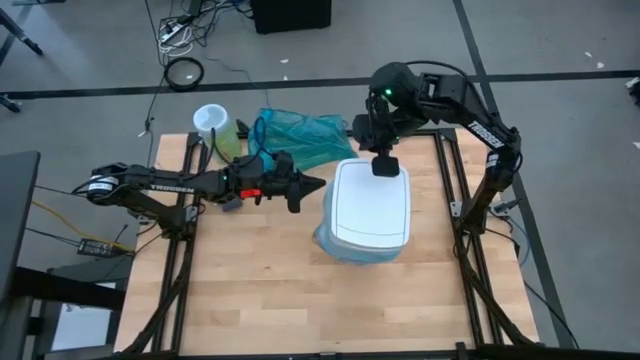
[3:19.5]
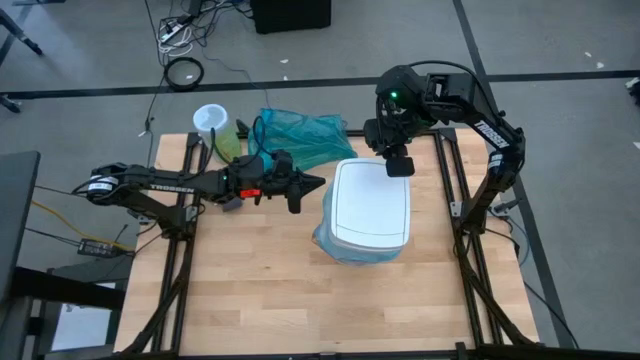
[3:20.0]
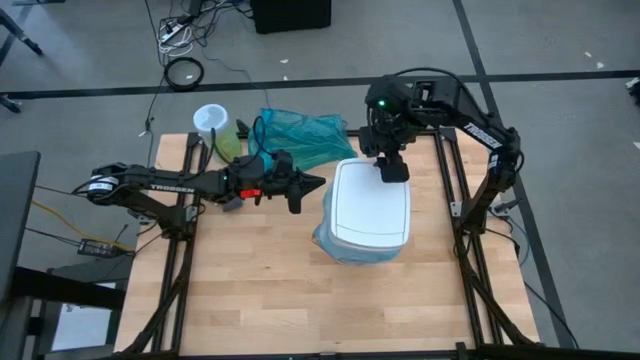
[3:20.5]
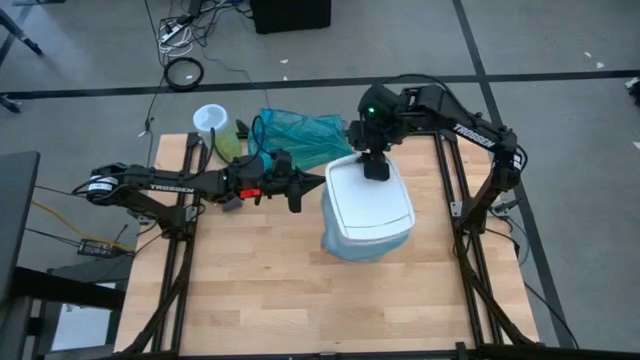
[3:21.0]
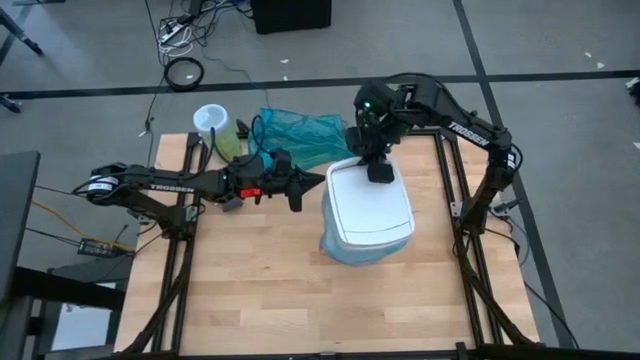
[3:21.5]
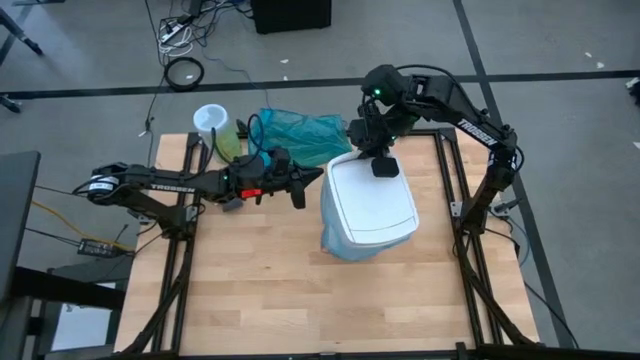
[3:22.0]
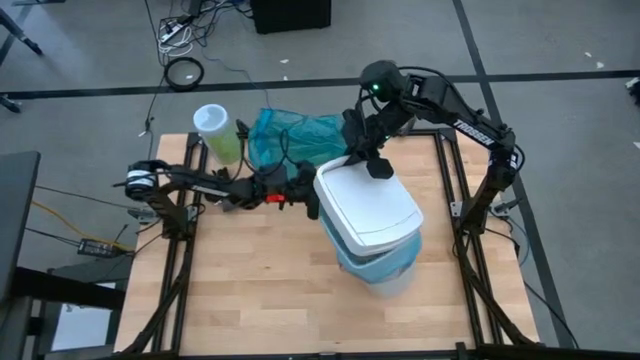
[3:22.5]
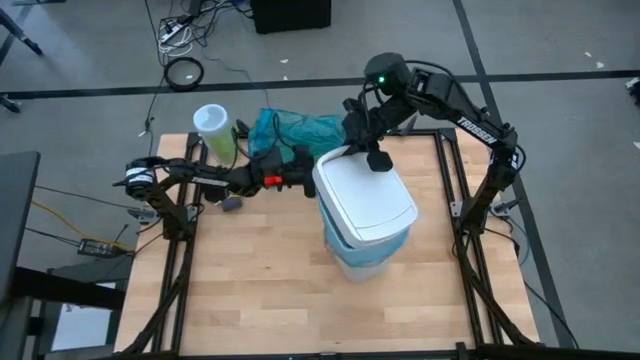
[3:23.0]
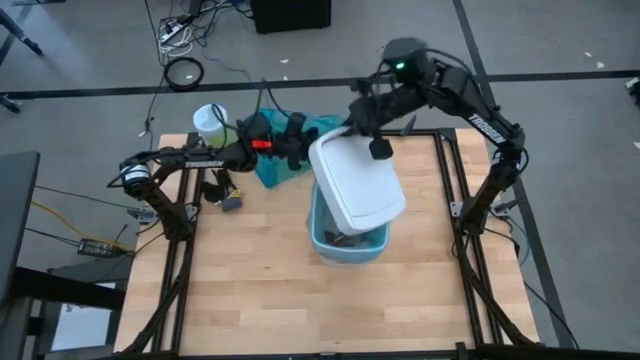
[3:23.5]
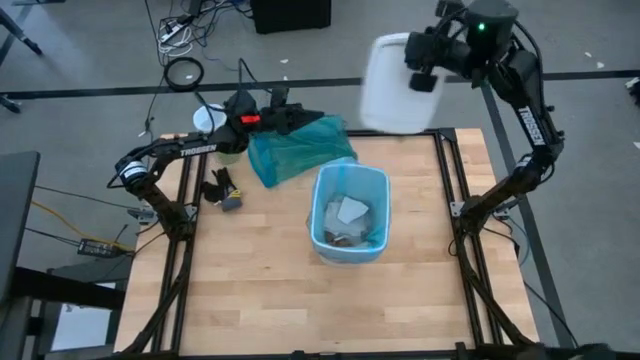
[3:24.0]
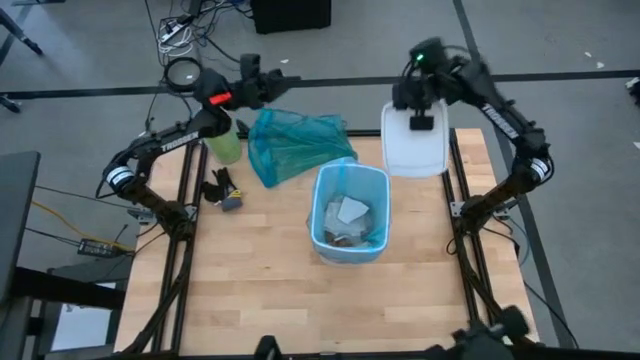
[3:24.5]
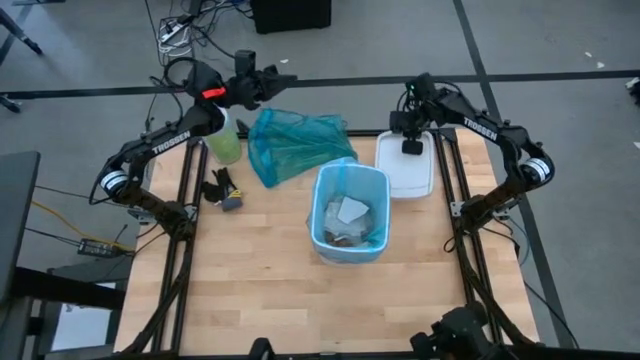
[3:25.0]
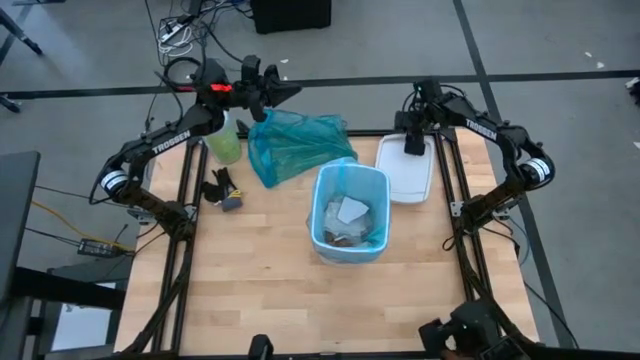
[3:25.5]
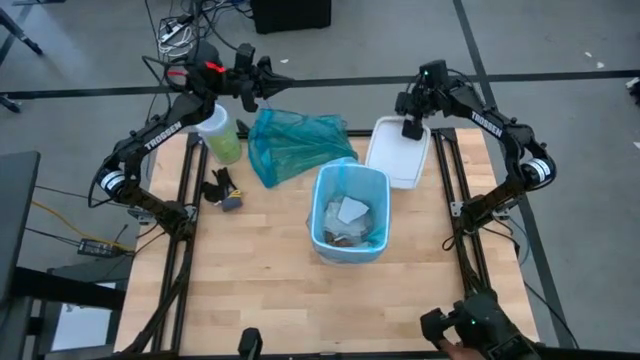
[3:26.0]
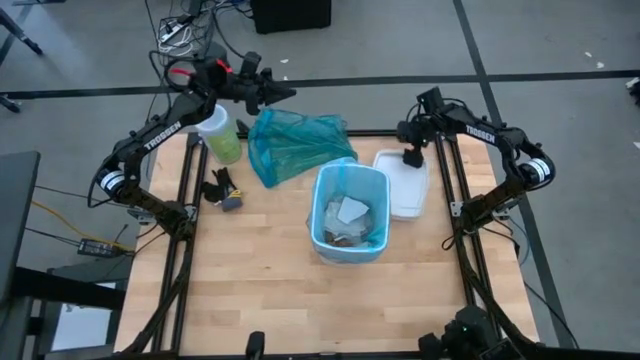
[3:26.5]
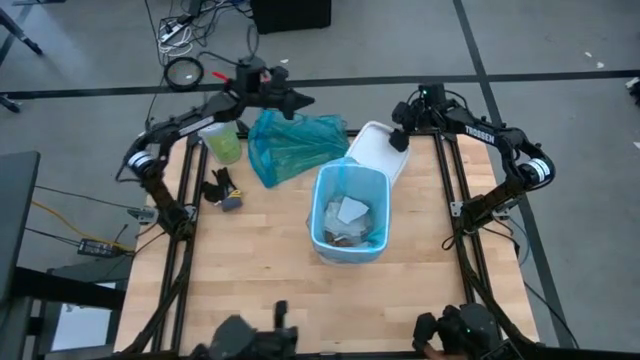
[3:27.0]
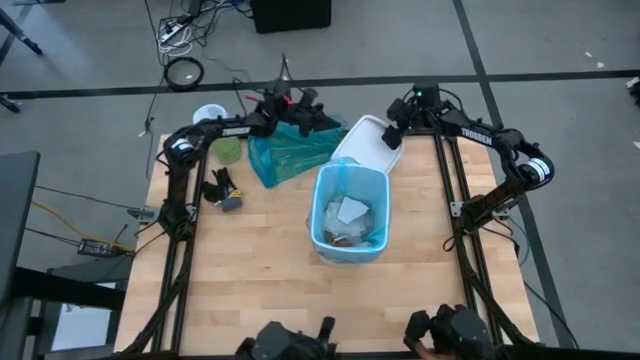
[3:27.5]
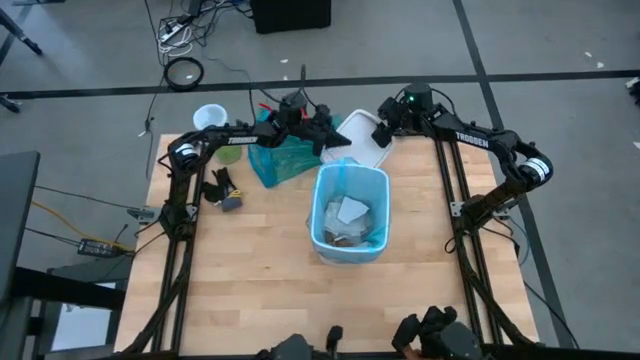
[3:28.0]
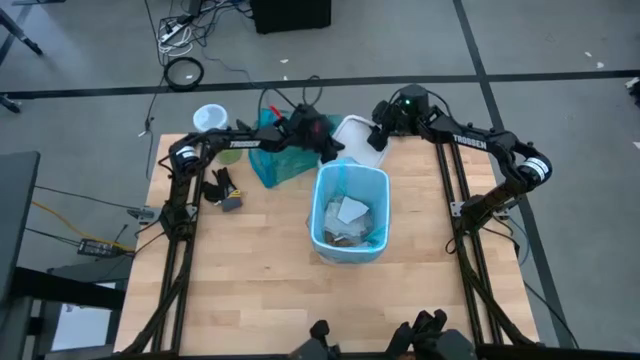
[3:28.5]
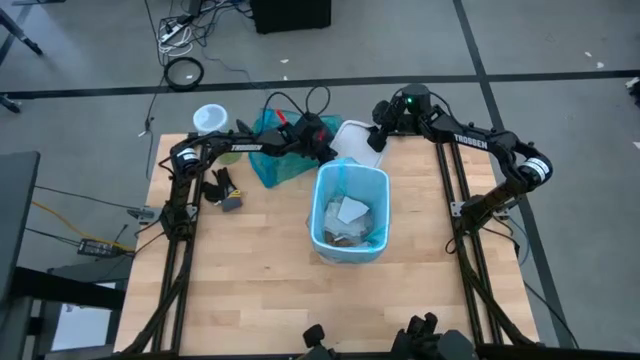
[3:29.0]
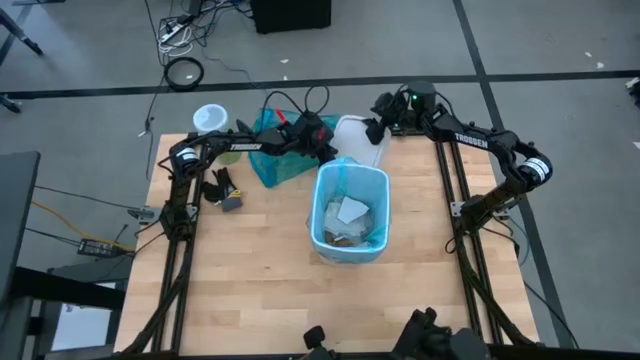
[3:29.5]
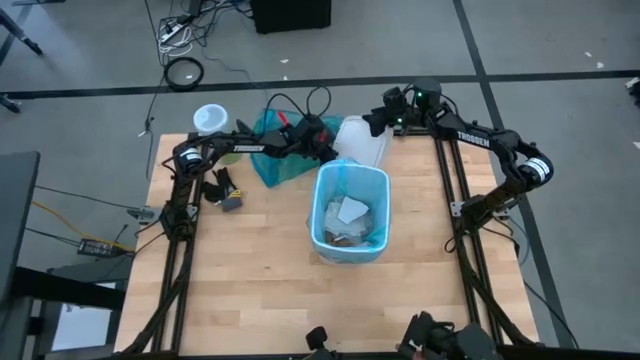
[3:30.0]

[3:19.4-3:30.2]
Task: place trash/remove bag and relplace
Remove the white trash lid from the white trash bin

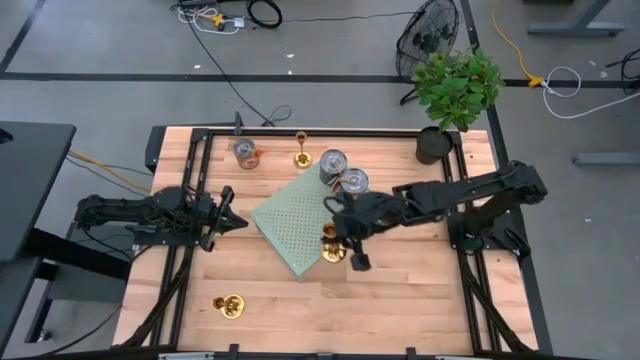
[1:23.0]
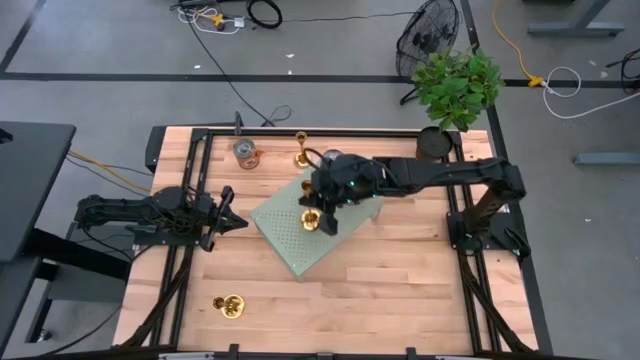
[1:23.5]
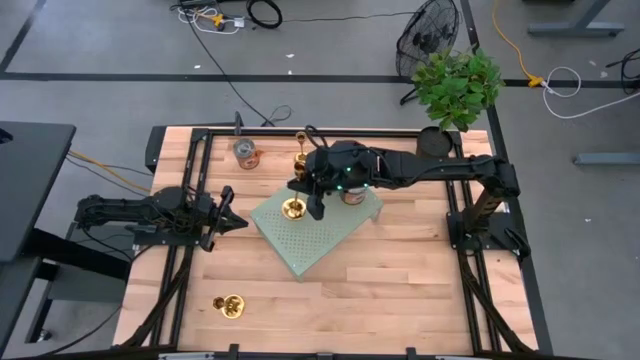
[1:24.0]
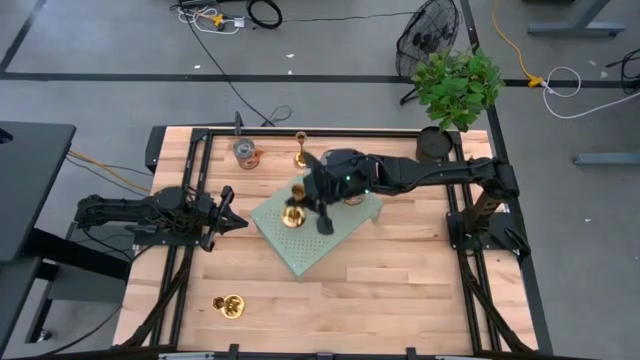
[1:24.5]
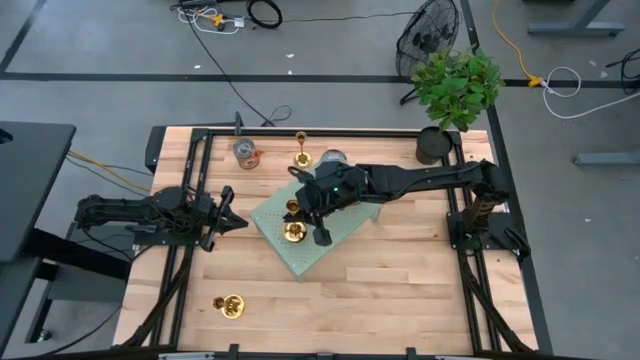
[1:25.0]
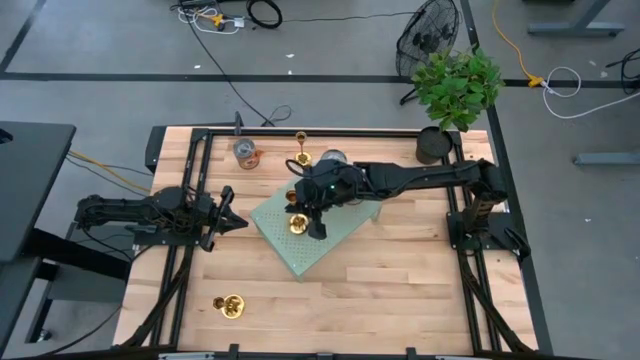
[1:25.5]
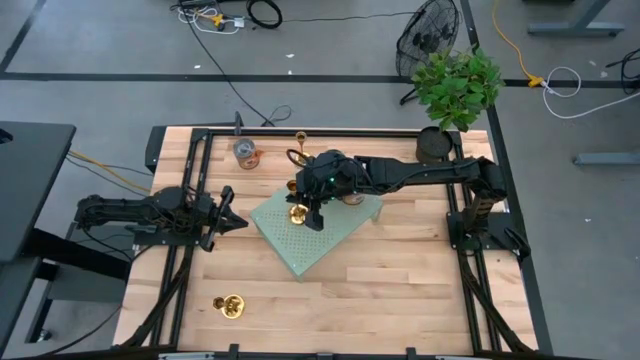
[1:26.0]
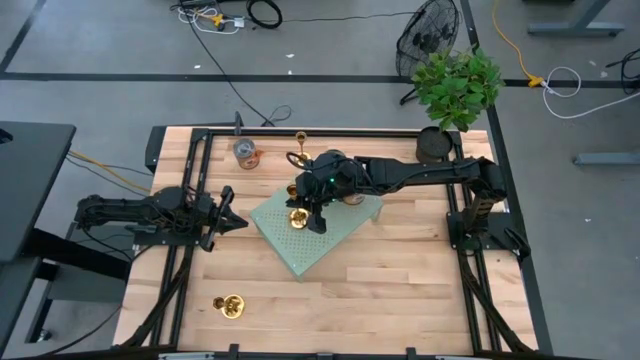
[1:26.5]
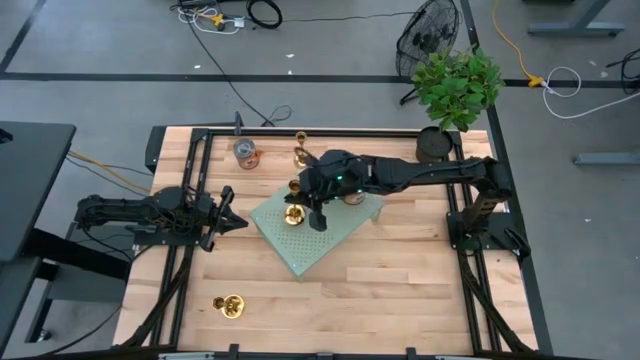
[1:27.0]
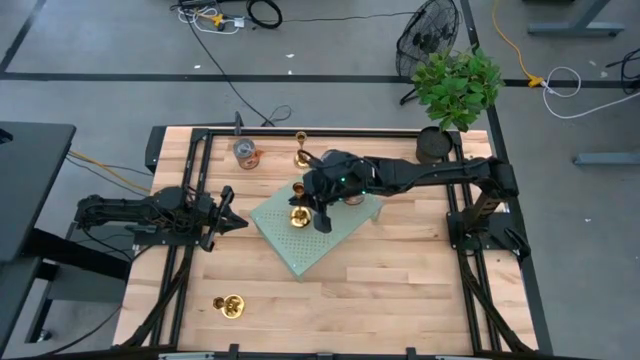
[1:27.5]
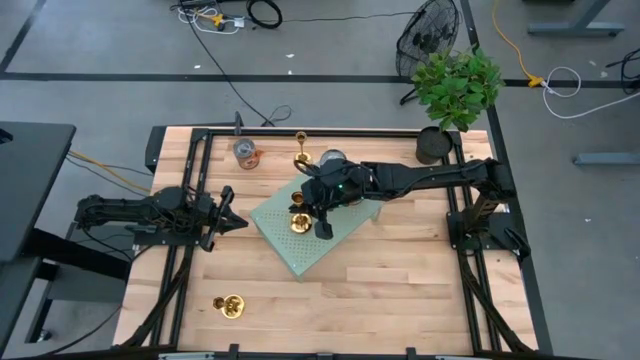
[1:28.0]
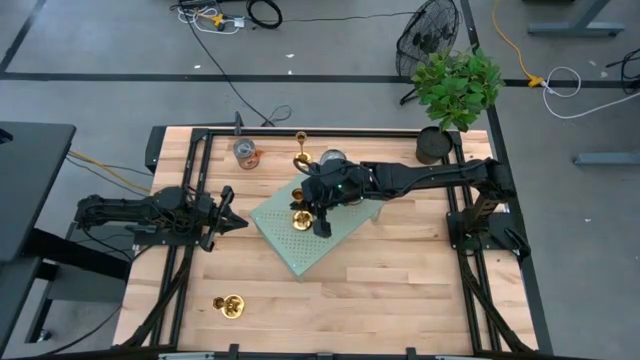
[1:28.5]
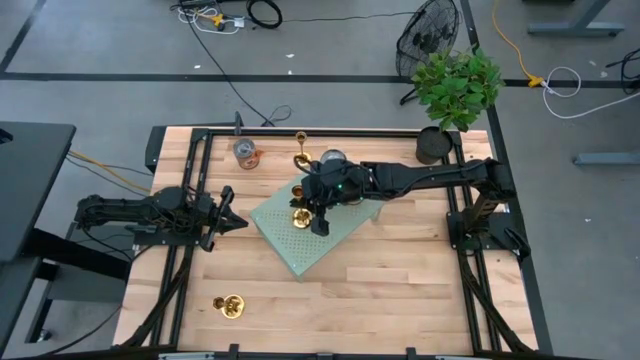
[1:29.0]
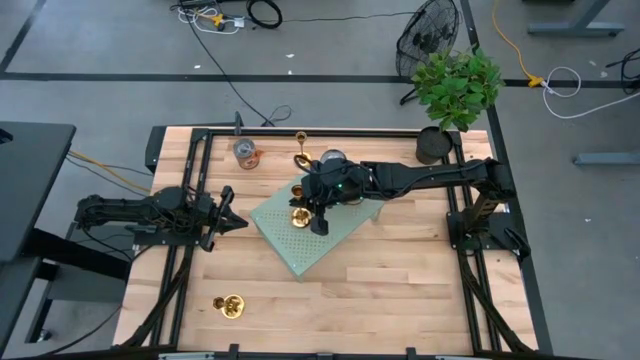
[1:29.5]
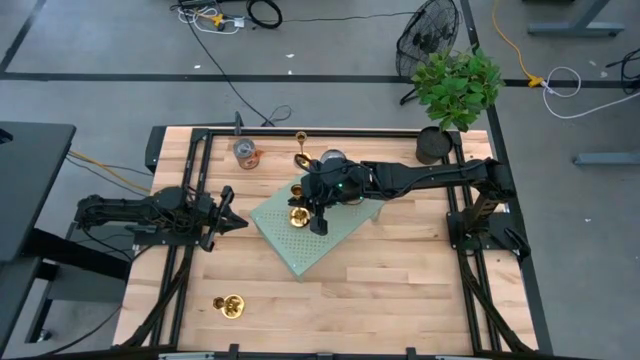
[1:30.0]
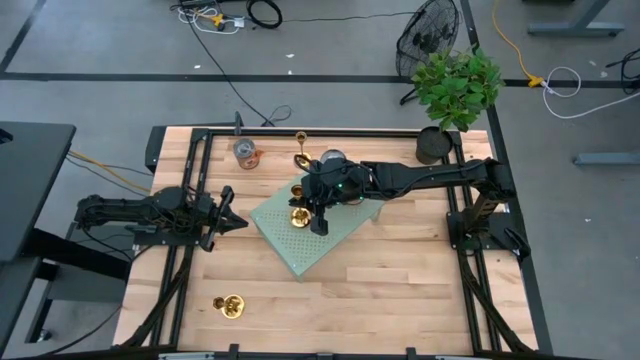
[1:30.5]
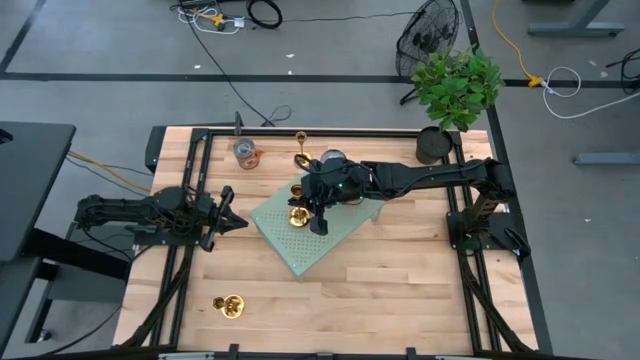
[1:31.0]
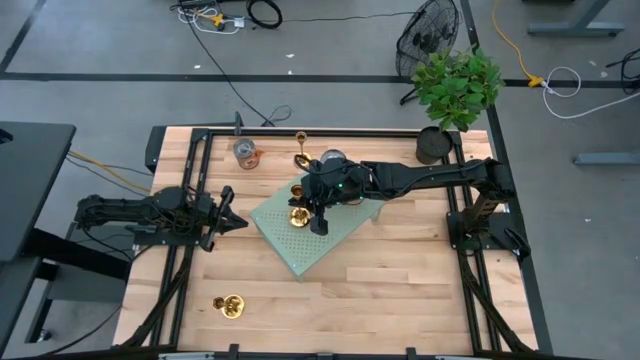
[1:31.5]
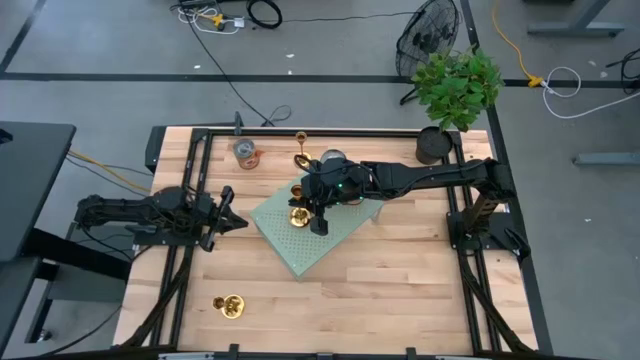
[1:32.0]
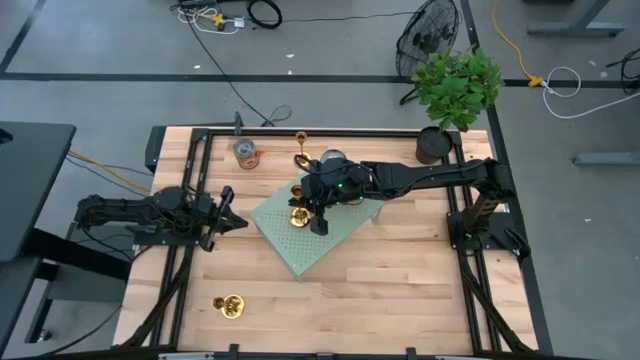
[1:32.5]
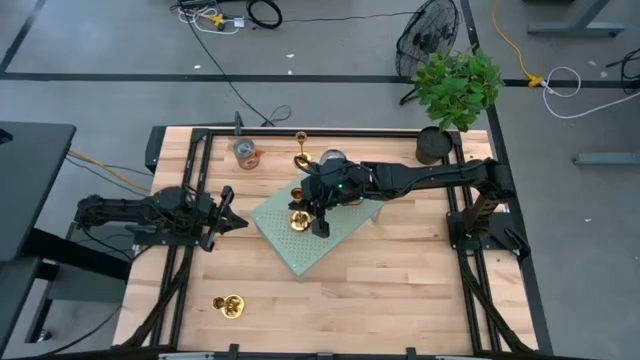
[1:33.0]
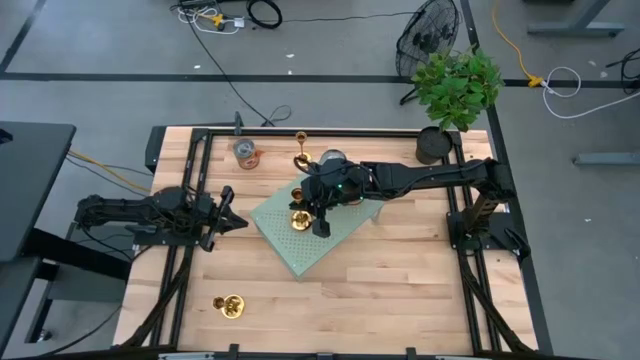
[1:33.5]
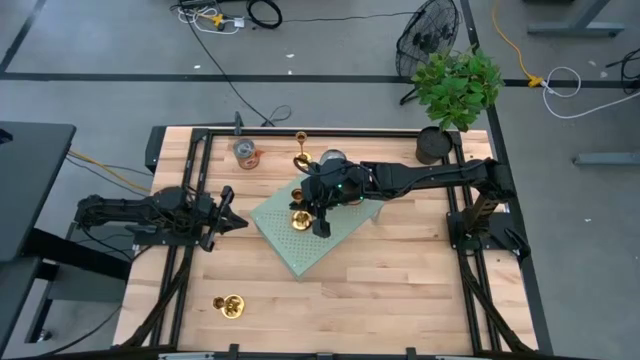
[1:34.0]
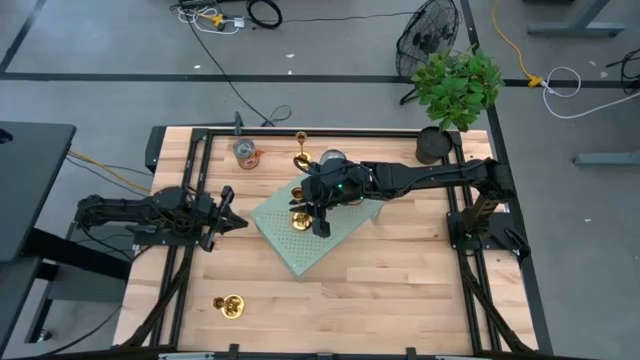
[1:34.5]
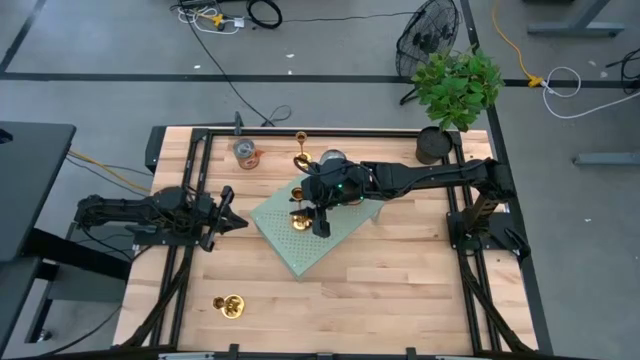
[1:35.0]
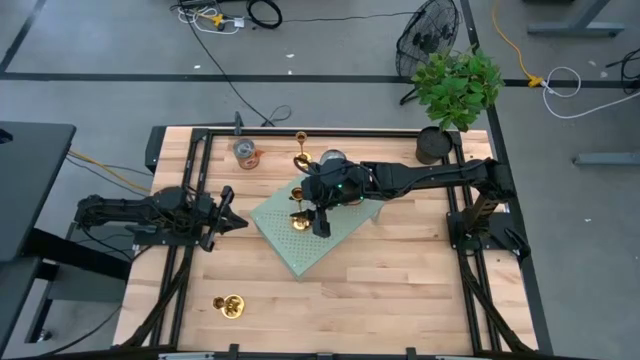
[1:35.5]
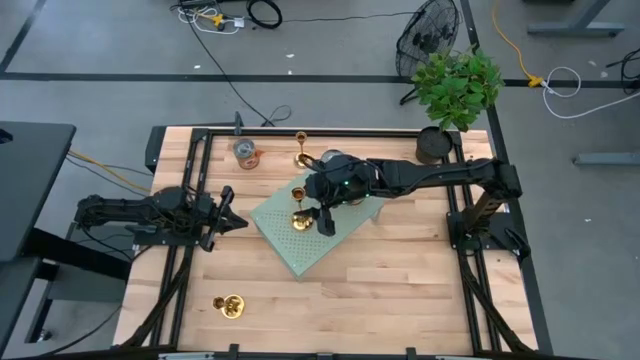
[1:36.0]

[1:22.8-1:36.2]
Task: Pick & Place candle stick holders
Put the middle gold candle holder on the shelf
